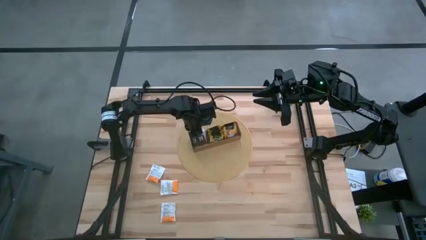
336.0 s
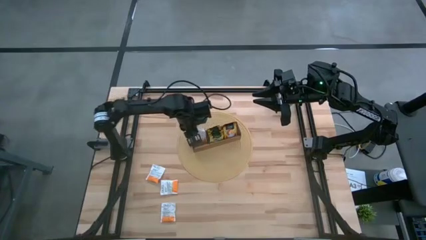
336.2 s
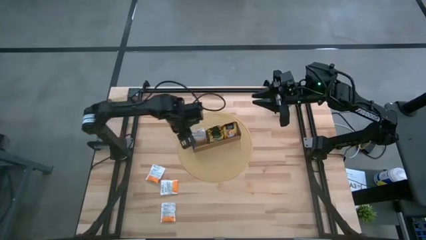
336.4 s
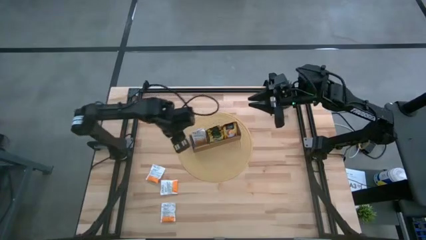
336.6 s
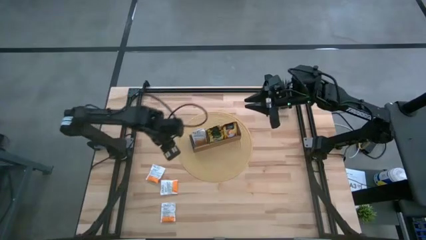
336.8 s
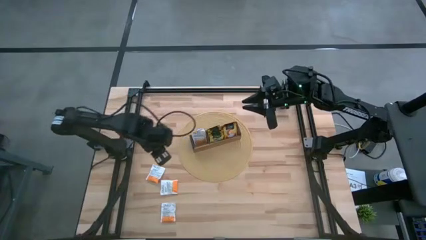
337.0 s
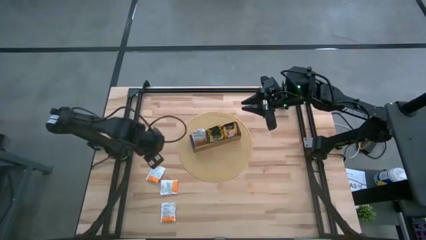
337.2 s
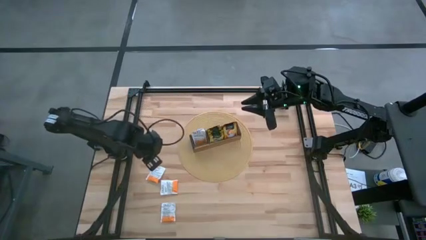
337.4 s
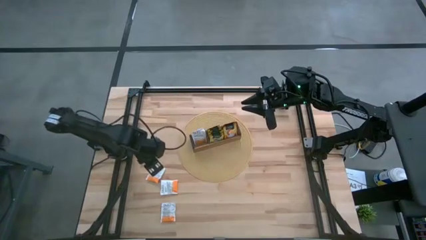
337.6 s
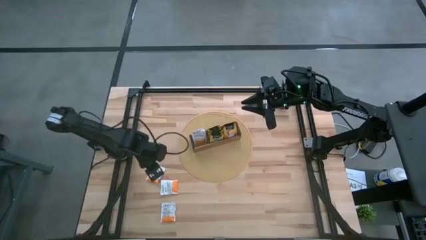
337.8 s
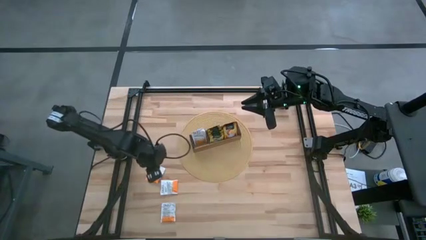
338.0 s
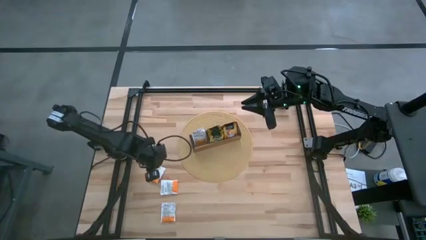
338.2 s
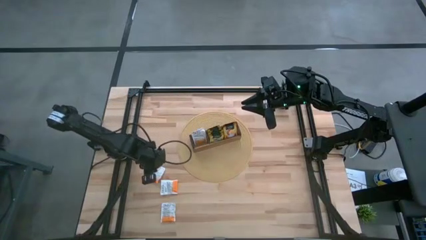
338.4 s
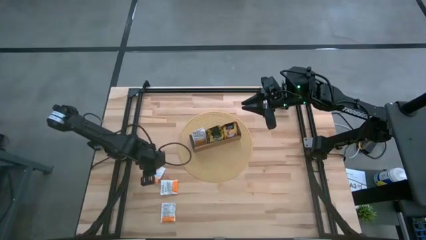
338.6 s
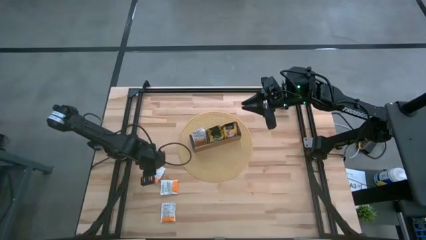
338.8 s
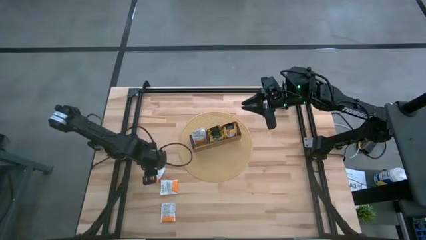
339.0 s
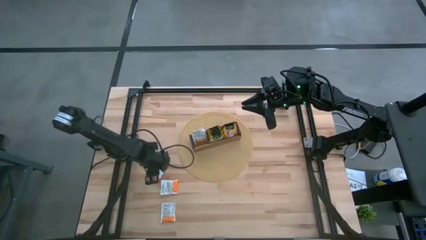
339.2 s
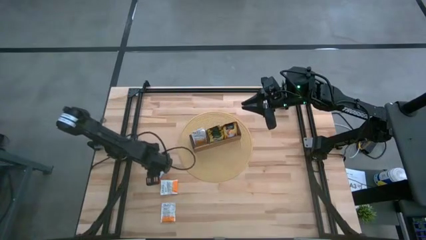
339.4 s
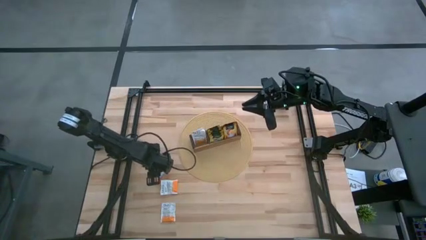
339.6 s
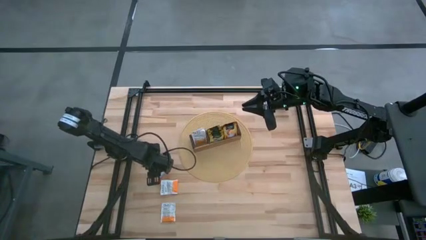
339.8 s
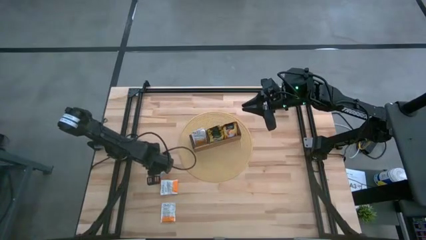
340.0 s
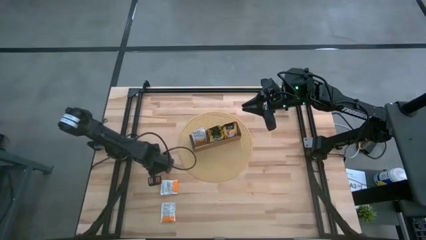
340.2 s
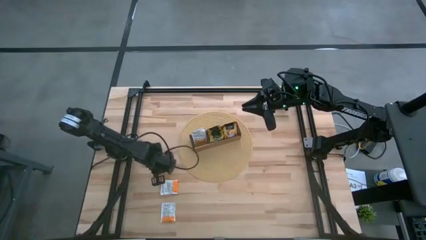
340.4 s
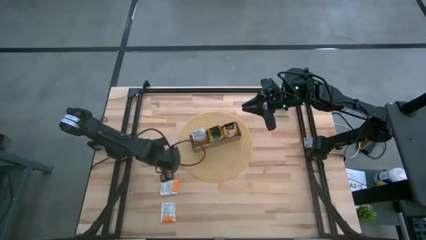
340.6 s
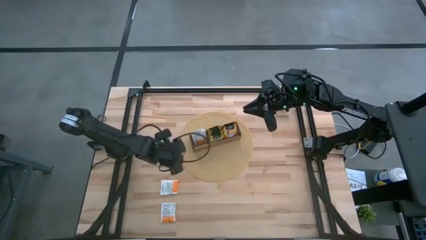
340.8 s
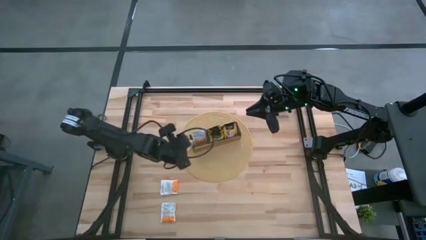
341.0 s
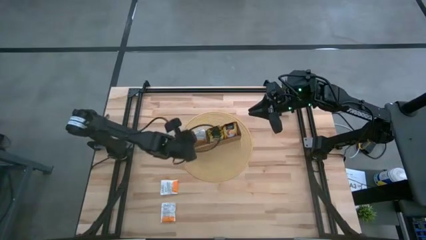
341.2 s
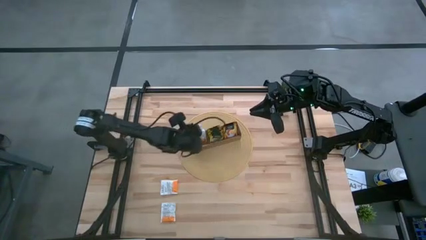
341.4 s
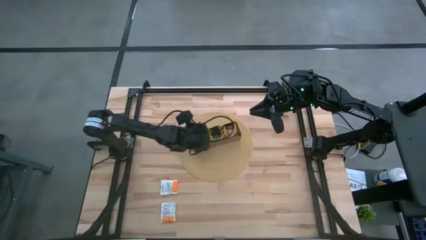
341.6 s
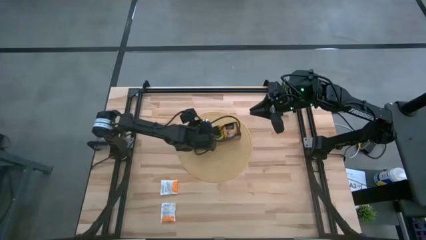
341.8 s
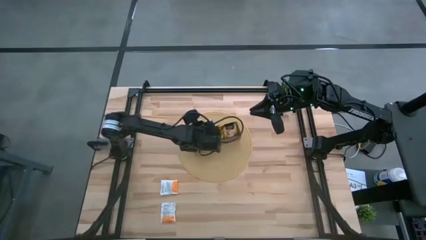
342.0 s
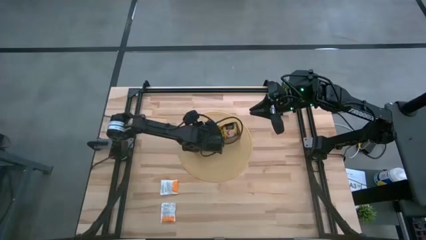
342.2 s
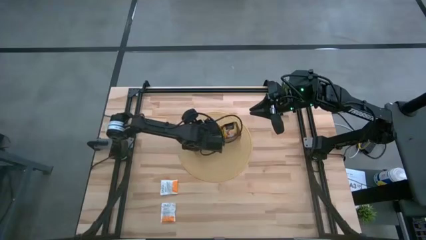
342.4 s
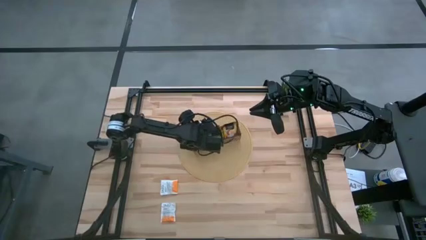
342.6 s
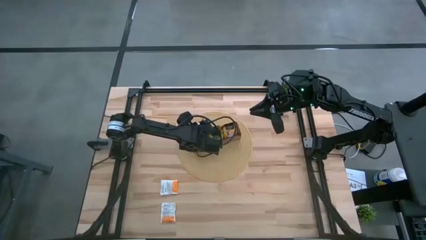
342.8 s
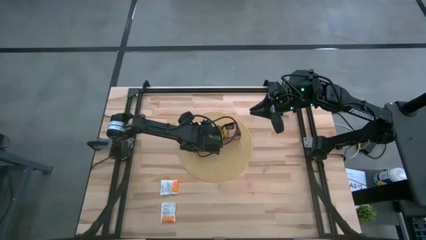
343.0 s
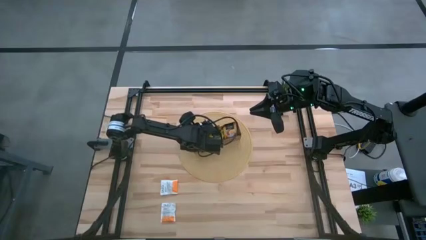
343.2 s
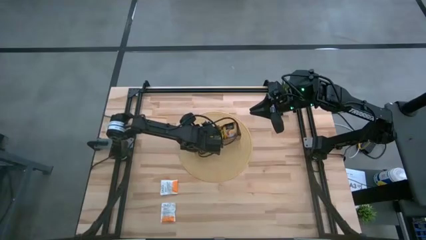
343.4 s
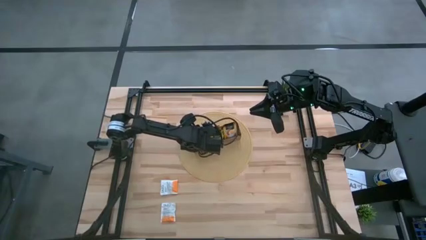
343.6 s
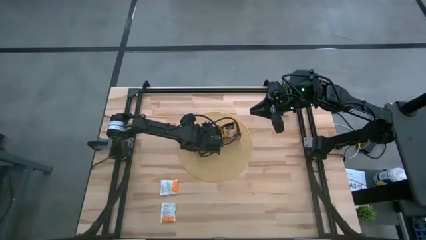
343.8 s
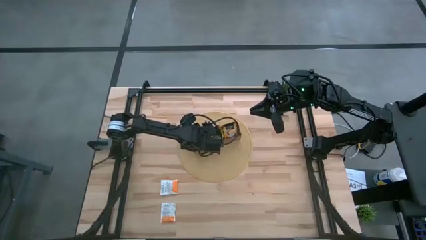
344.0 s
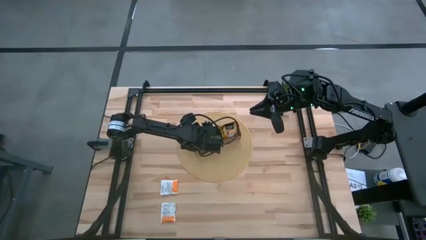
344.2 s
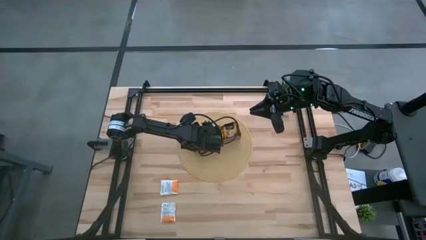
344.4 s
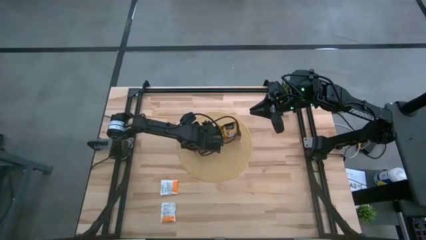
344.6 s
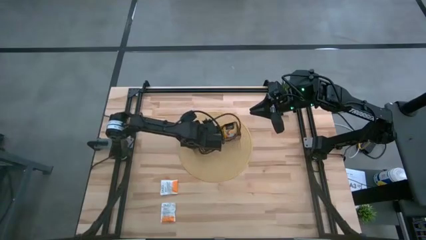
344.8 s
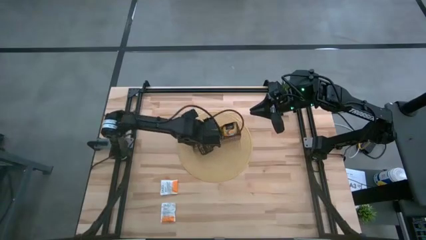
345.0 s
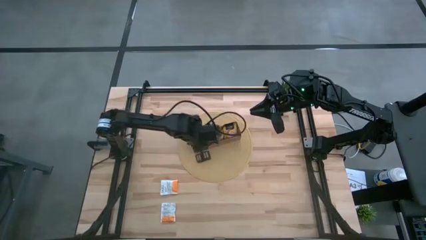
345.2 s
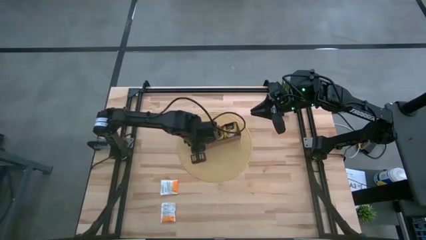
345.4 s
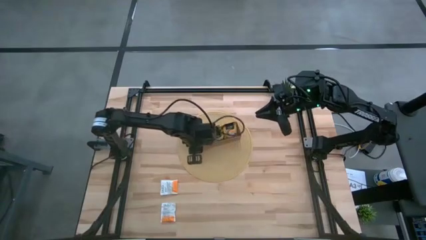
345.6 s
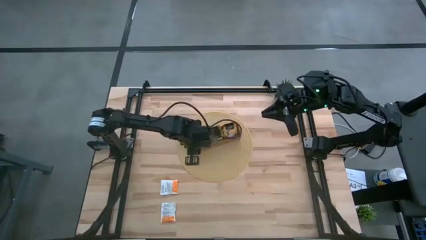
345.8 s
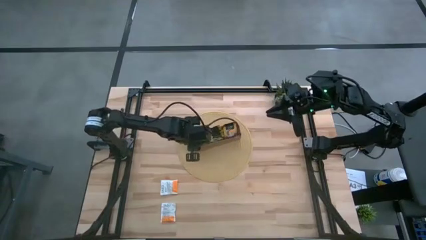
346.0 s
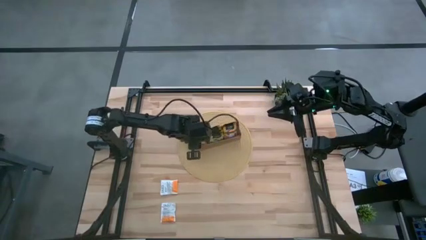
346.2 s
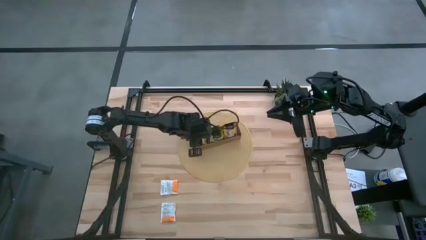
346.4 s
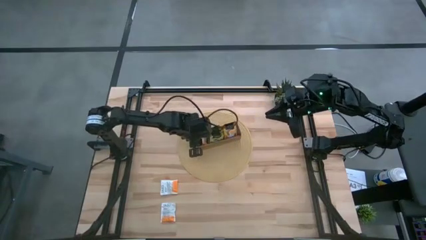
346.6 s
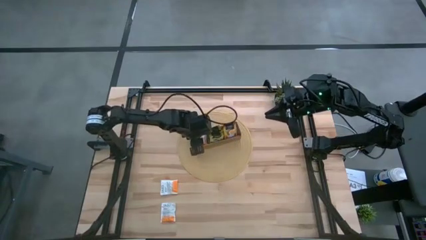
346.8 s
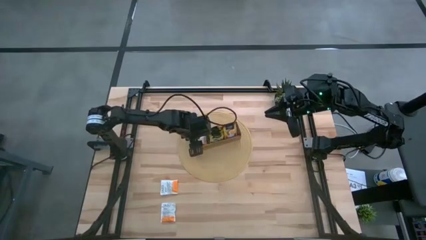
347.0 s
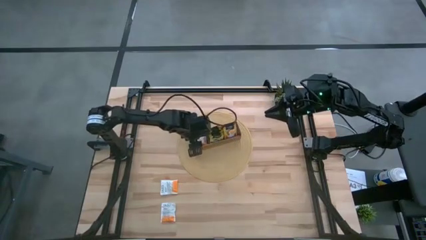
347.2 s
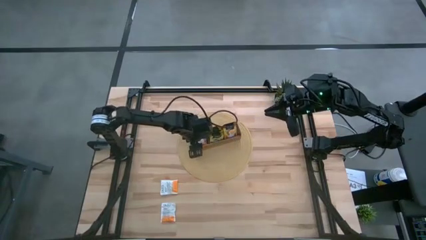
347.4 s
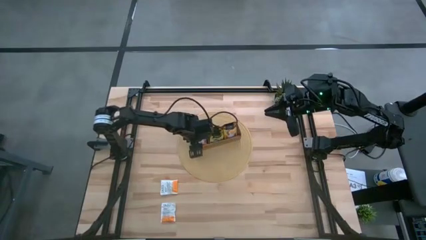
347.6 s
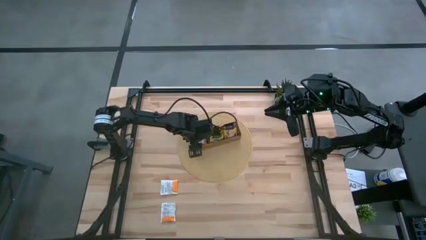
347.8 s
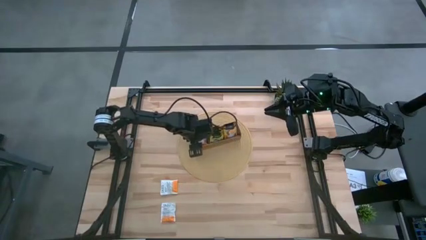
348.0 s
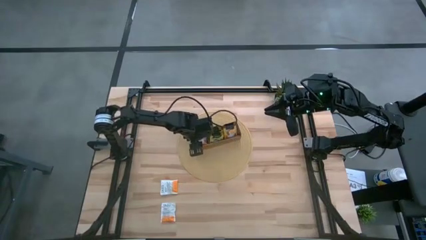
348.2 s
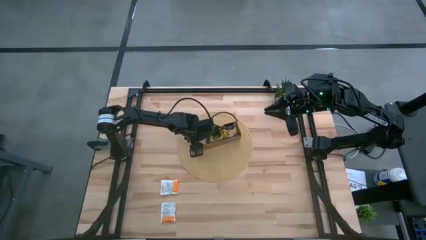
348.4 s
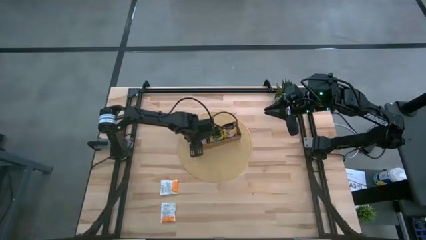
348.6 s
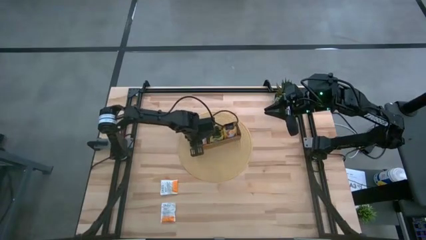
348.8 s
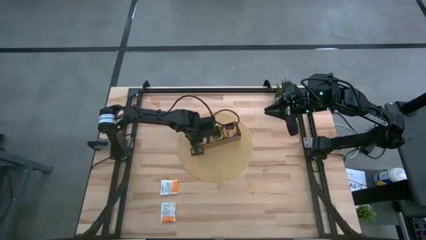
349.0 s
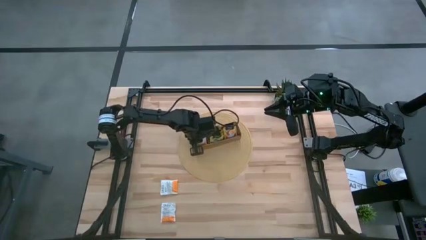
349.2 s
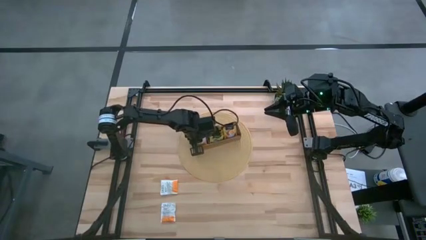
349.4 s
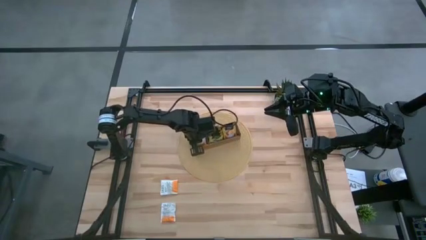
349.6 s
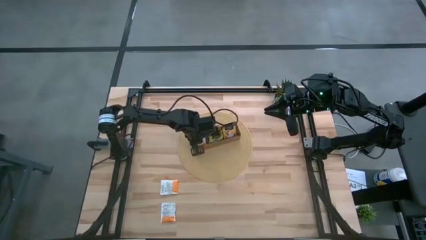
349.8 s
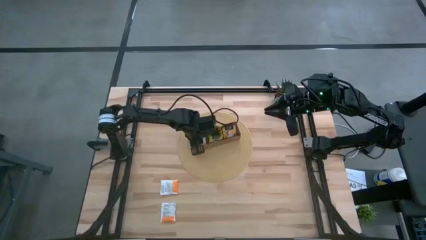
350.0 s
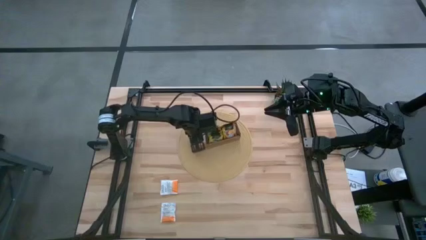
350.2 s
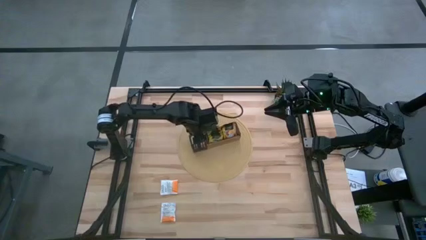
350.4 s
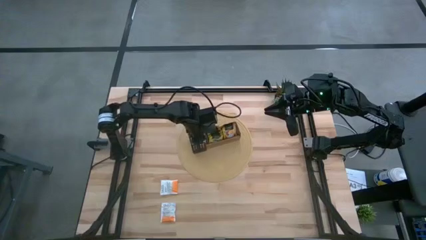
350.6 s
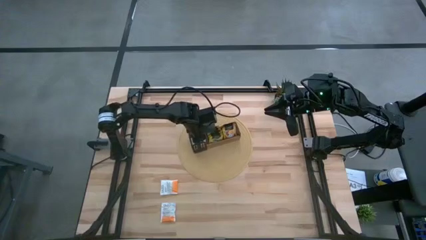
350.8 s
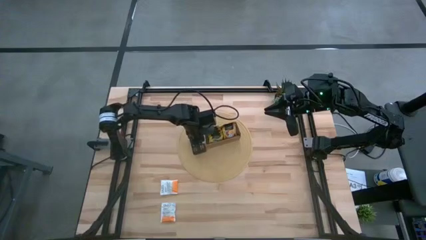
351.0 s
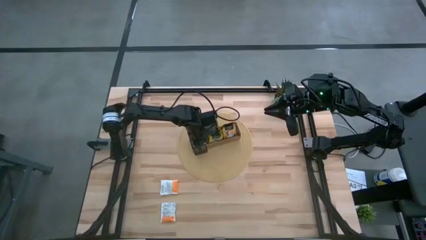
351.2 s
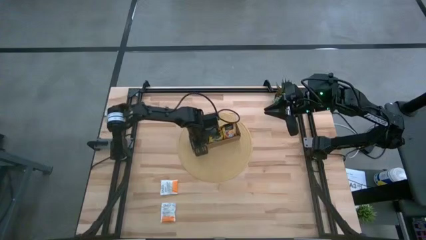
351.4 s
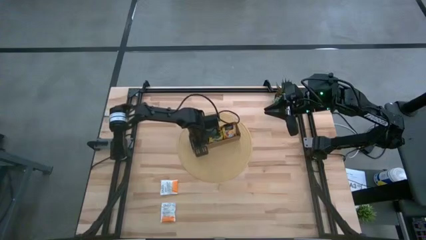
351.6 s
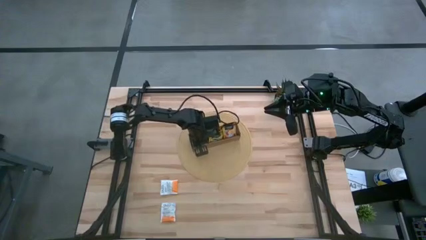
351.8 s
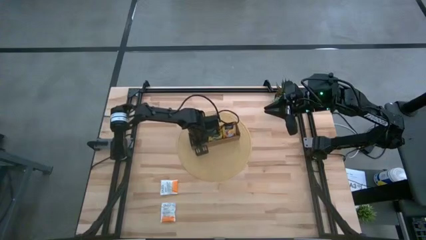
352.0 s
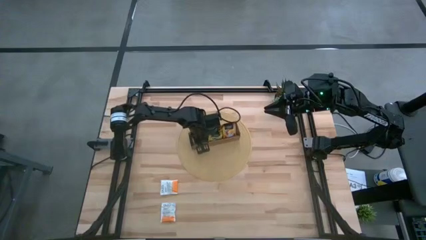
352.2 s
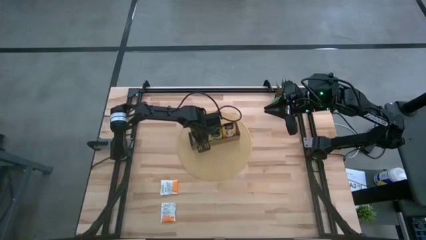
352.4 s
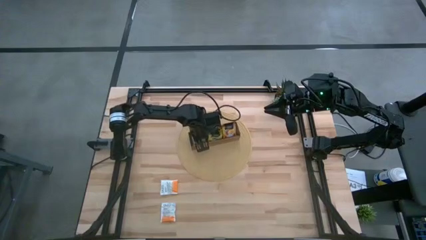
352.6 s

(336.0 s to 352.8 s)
Task: Pick & Place Tea
Put the white tea bag into the left section of the wooden organizer
